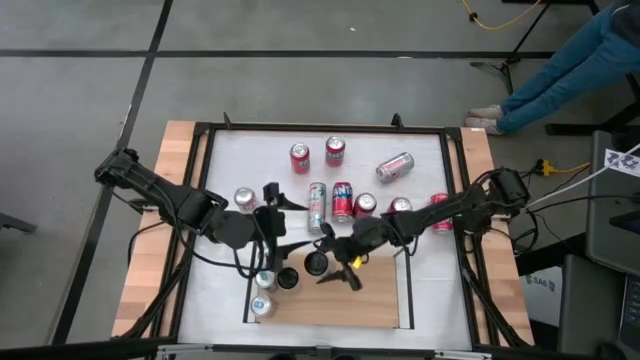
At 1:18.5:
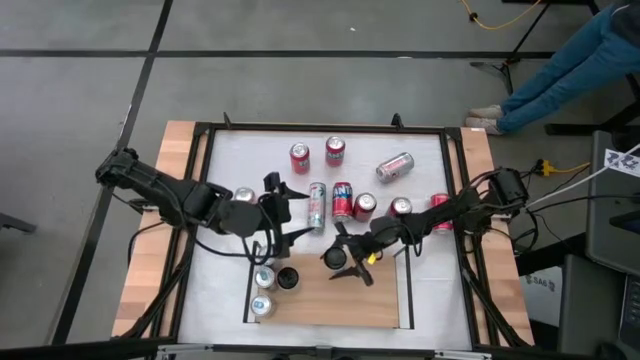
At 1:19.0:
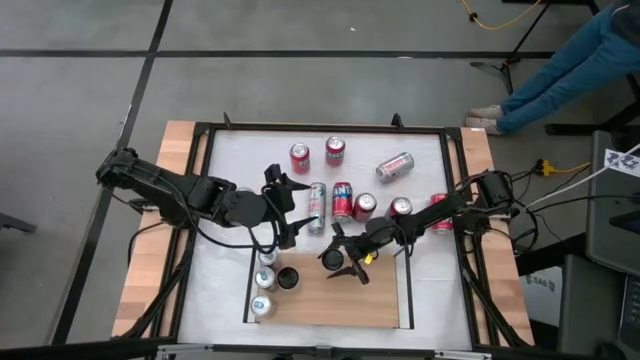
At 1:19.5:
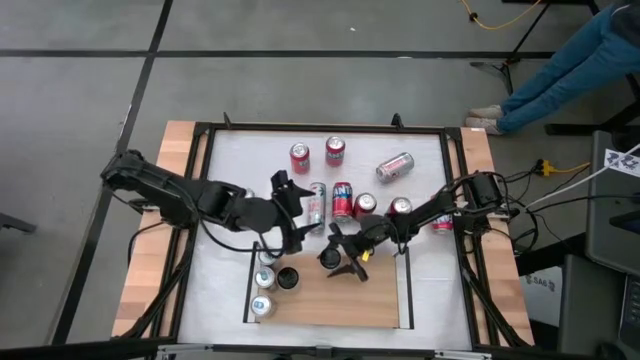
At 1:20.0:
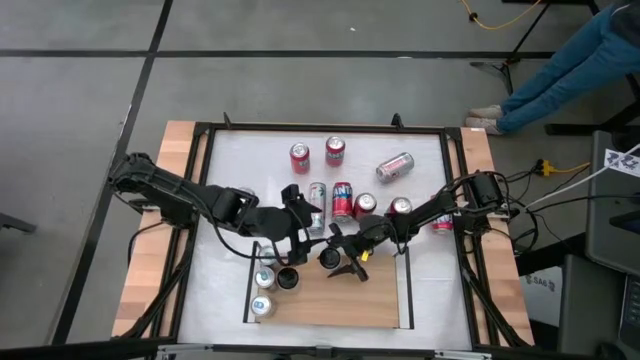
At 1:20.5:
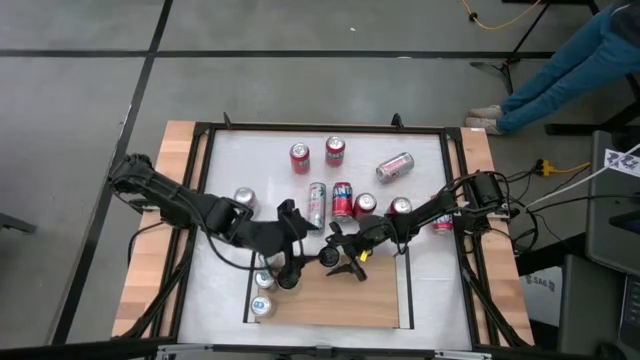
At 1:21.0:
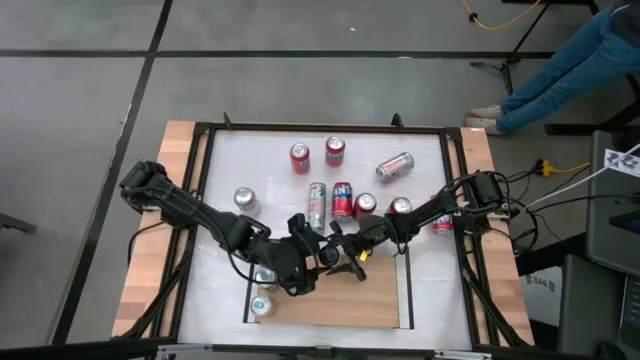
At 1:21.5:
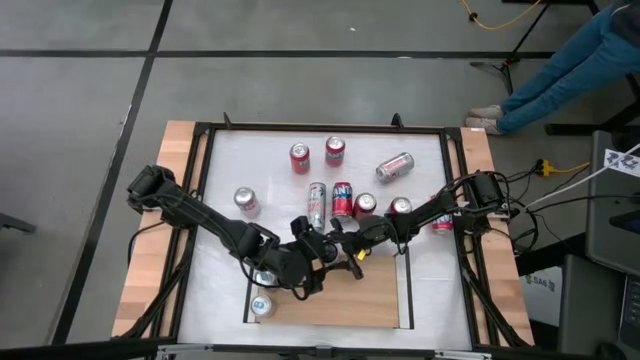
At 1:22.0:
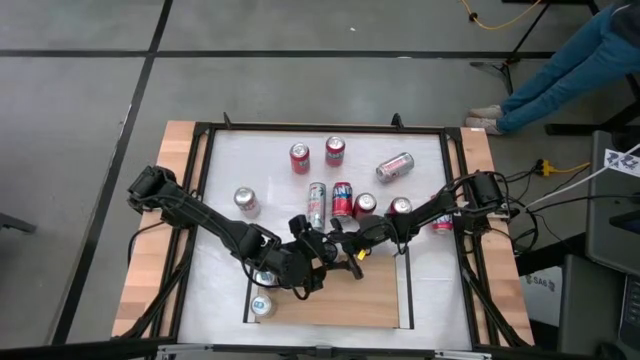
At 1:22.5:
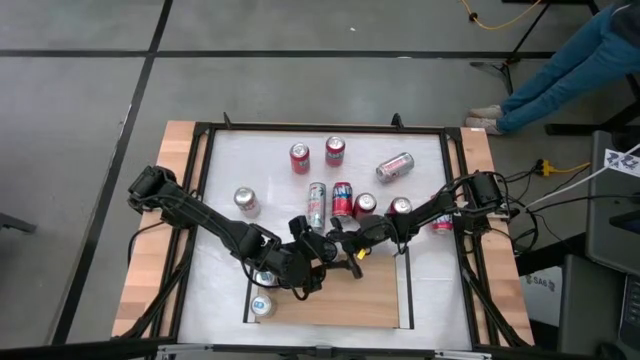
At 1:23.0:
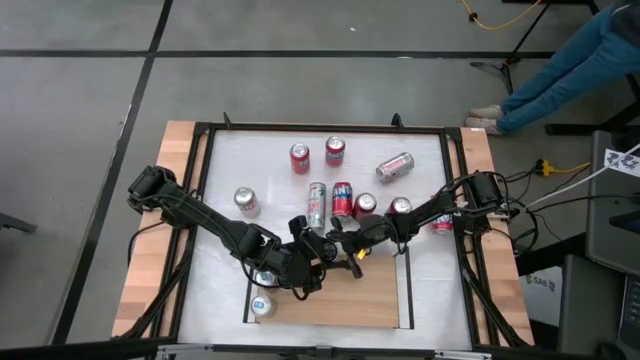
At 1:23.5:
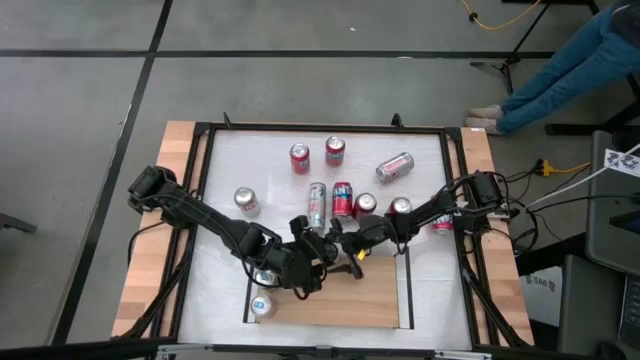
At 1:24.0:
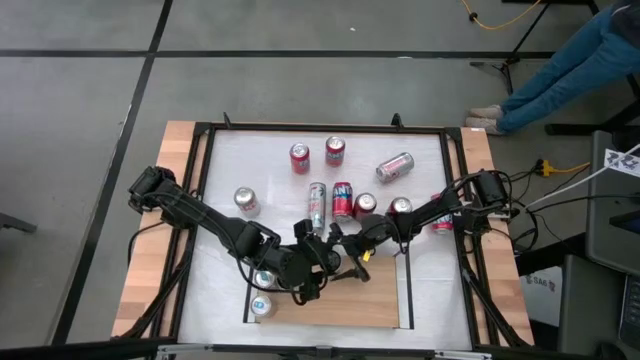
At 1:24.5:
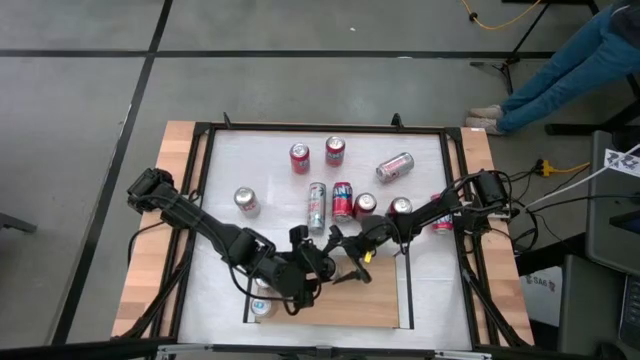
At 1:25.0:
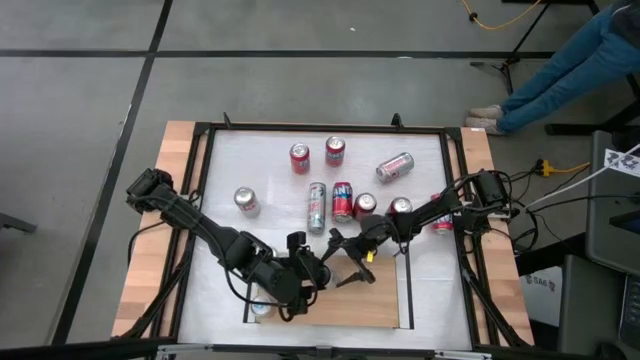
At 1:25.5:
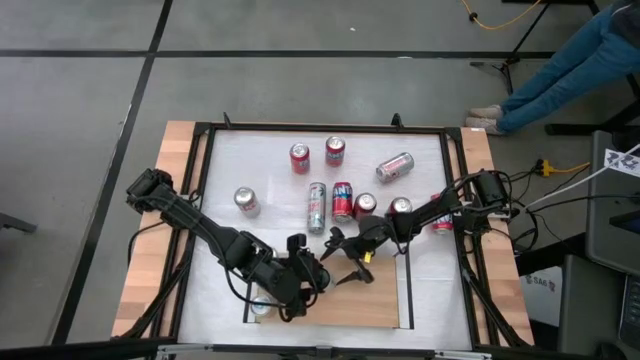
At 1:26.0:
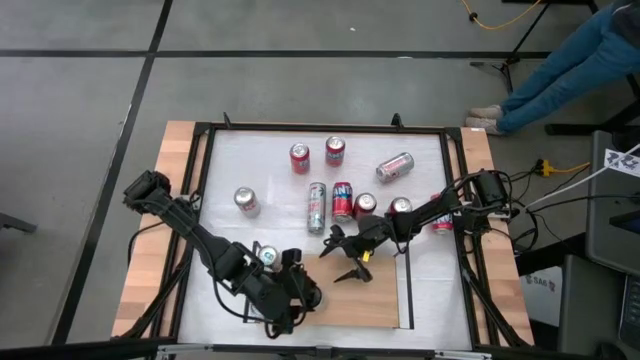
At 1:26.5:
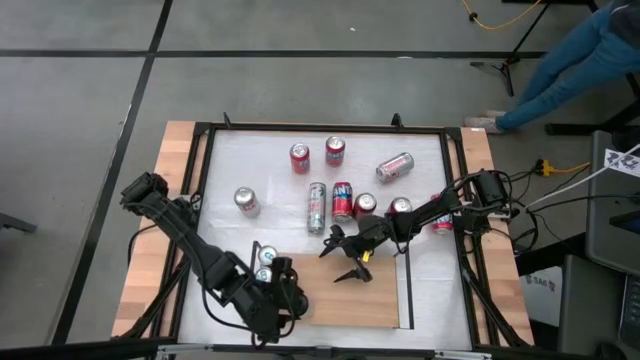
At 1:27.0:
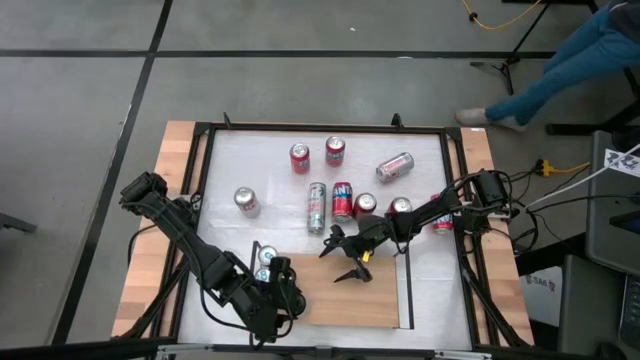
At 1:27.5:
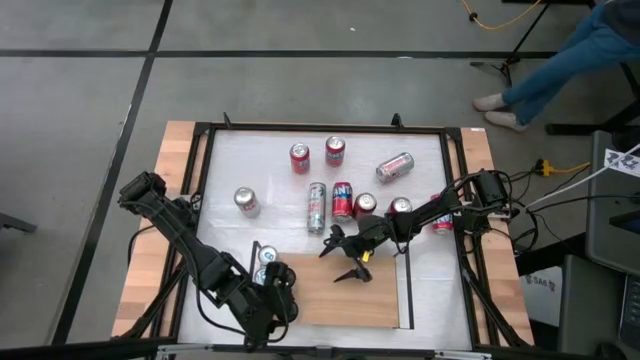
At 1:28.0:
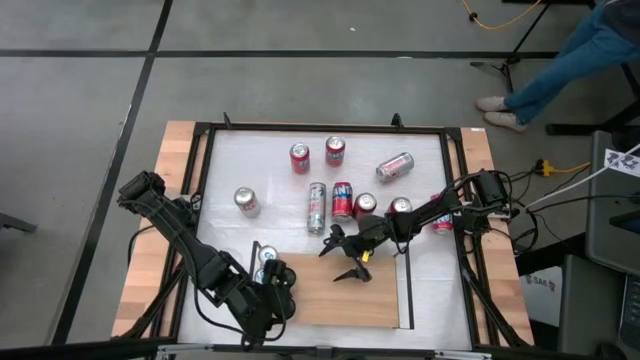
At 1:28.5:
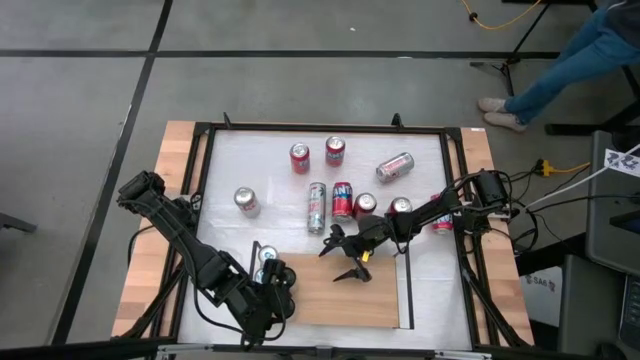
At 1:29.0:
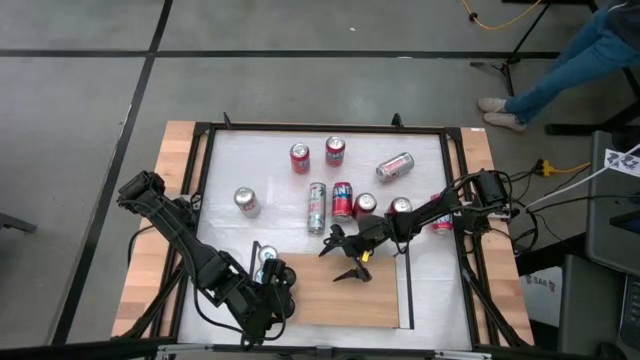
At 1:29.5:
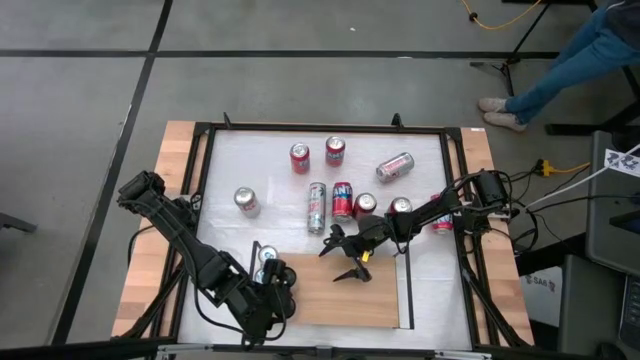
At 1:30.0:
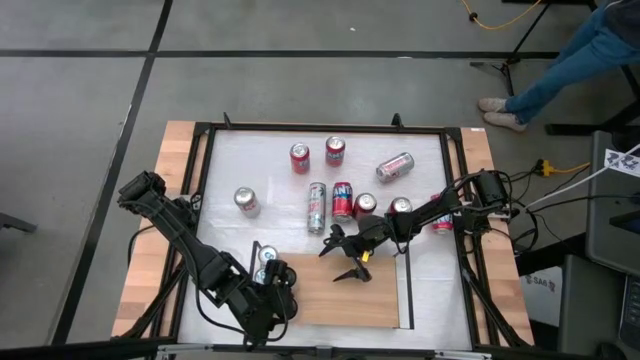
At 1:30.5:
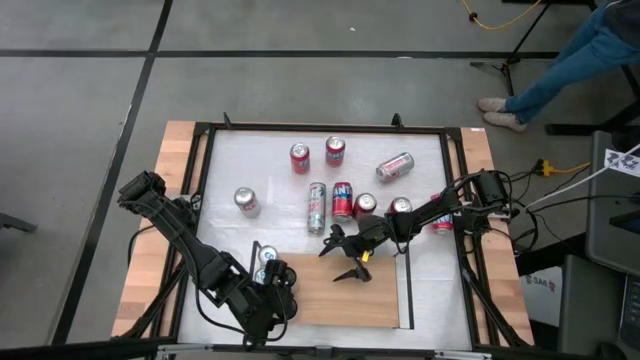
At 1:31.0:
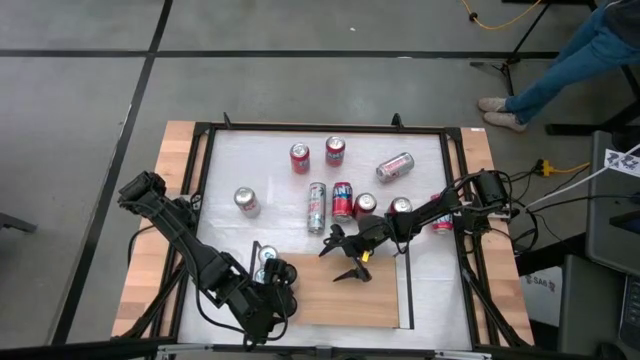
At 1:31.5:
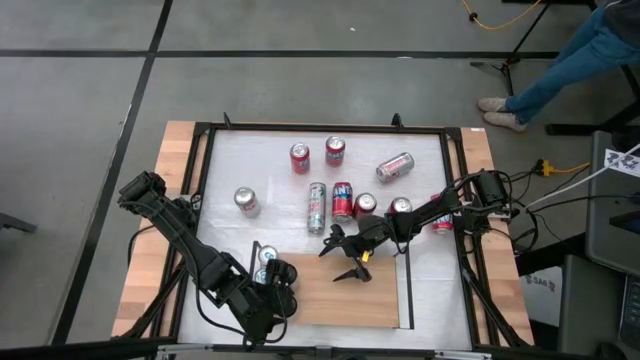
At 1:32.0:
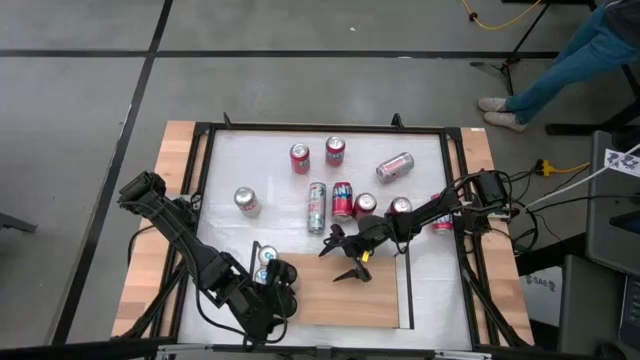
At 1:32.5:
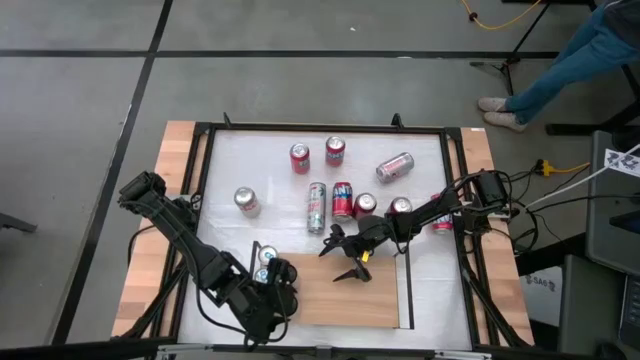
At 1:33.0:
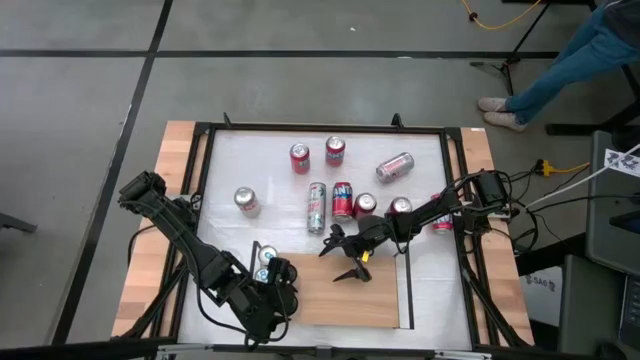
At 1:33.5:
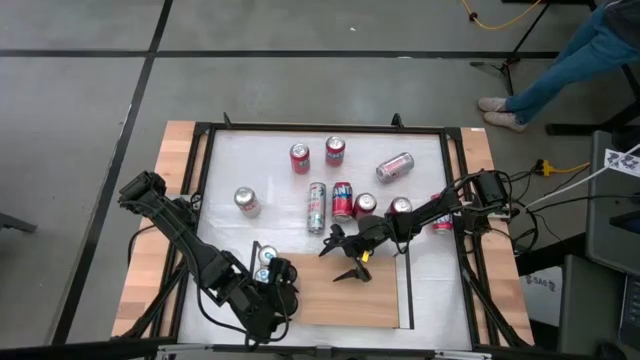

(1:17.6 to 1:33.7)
Task: Place canned beverage on shelf
Put the bottom left white soda can on the shelf aligned with the other white soda can
